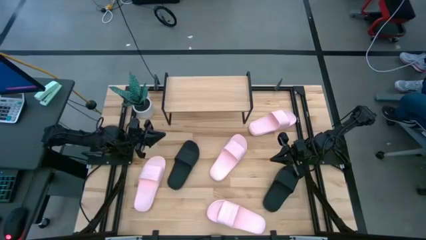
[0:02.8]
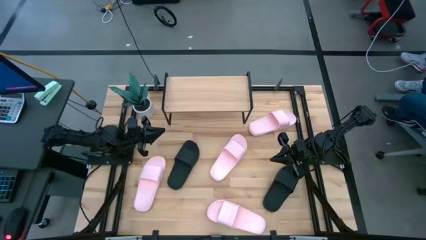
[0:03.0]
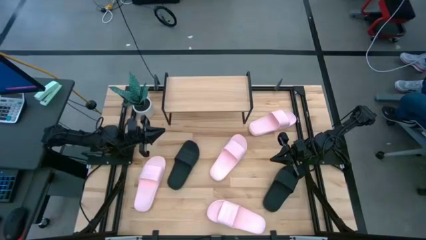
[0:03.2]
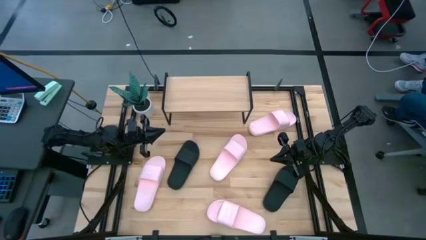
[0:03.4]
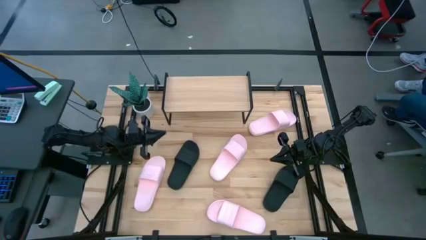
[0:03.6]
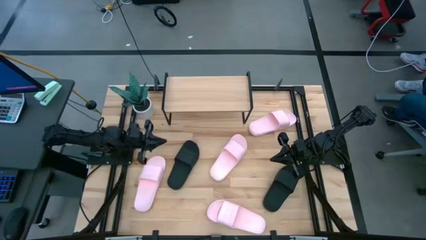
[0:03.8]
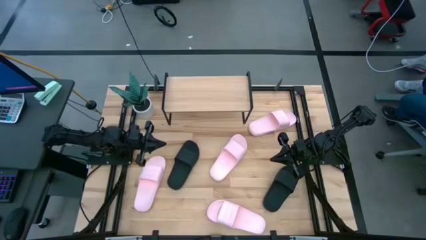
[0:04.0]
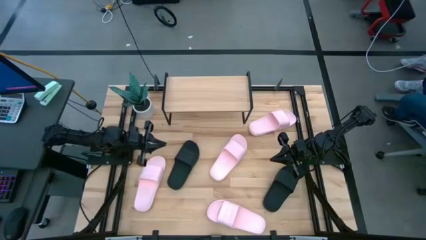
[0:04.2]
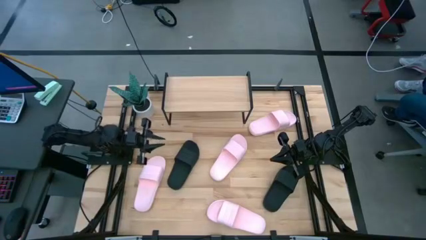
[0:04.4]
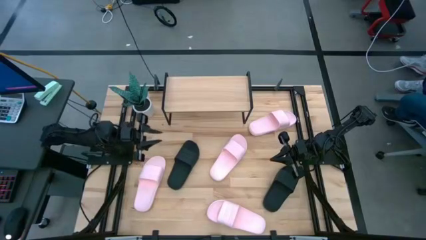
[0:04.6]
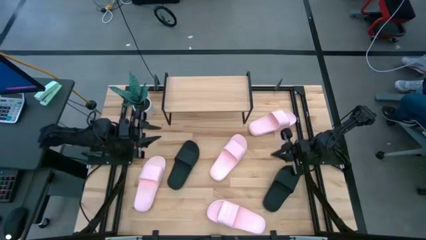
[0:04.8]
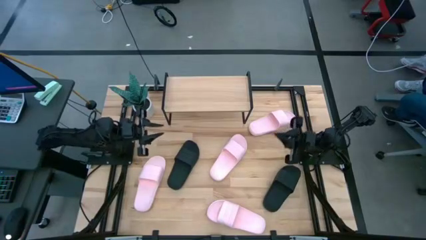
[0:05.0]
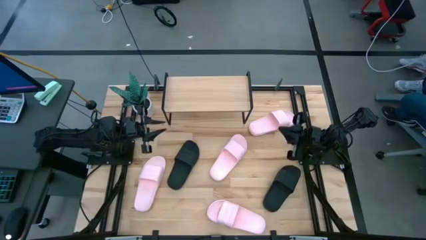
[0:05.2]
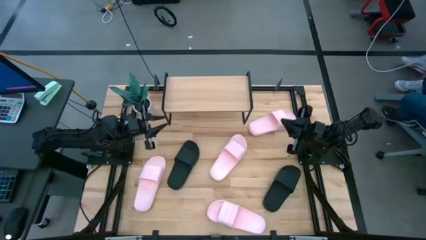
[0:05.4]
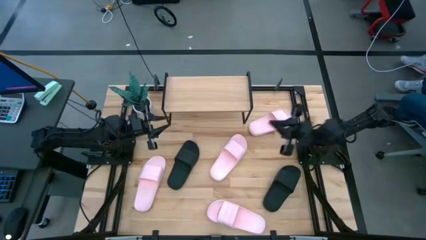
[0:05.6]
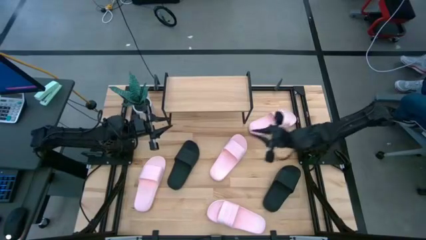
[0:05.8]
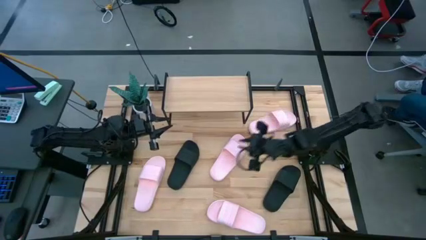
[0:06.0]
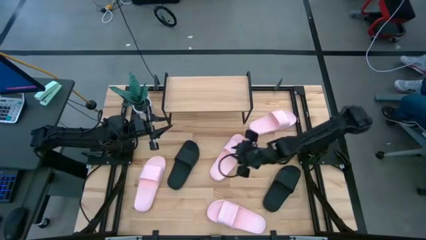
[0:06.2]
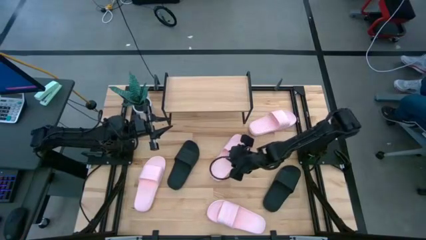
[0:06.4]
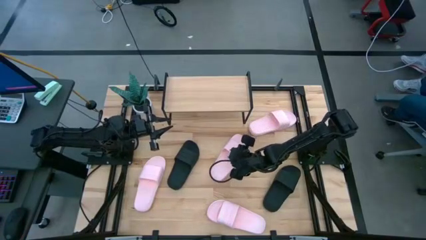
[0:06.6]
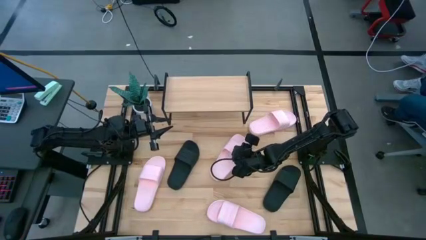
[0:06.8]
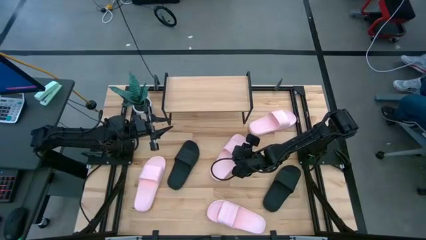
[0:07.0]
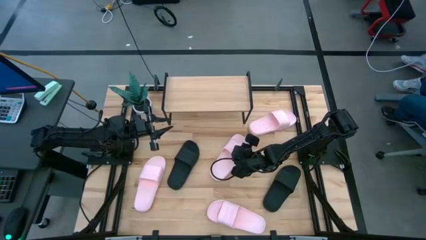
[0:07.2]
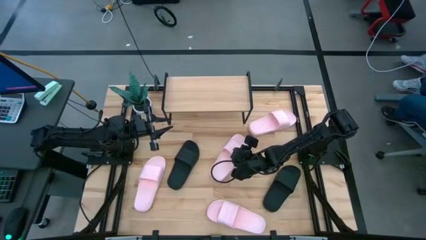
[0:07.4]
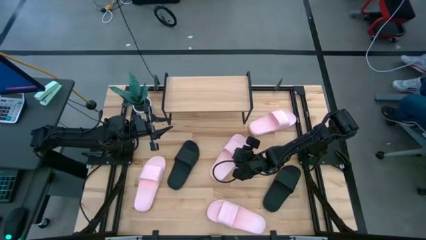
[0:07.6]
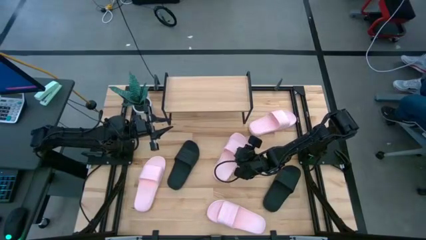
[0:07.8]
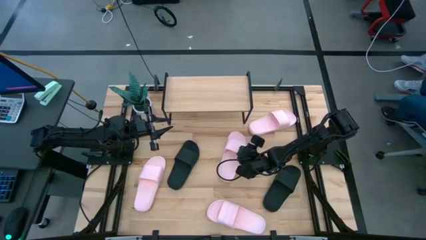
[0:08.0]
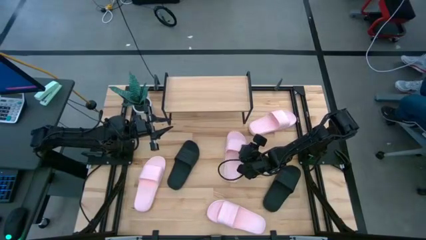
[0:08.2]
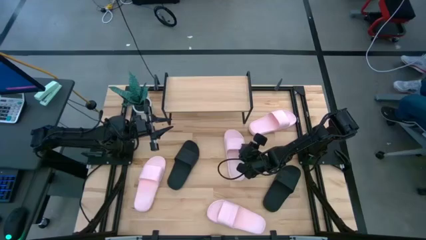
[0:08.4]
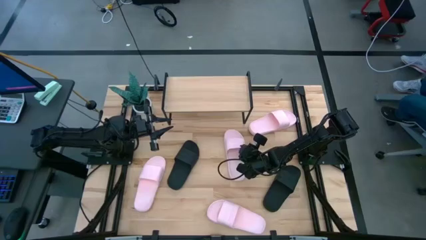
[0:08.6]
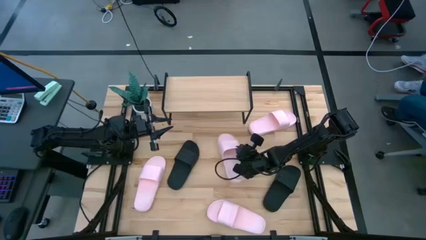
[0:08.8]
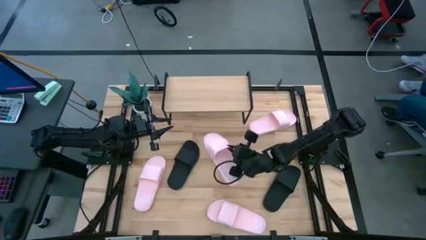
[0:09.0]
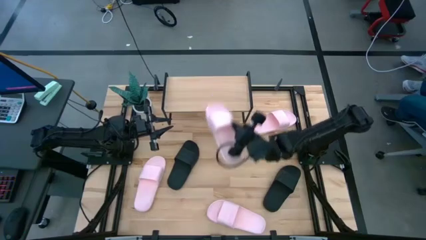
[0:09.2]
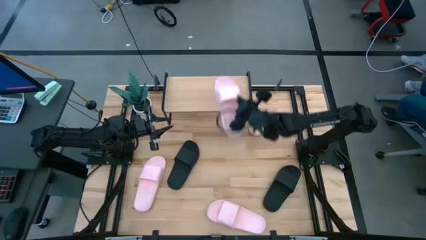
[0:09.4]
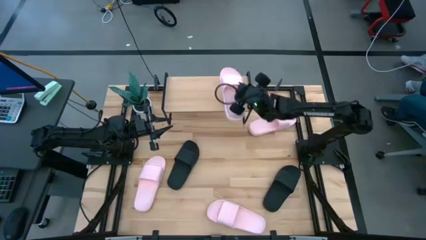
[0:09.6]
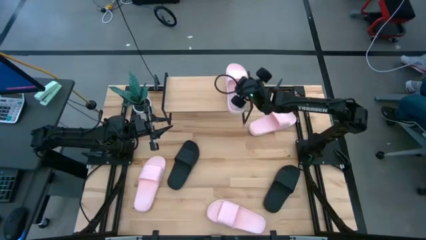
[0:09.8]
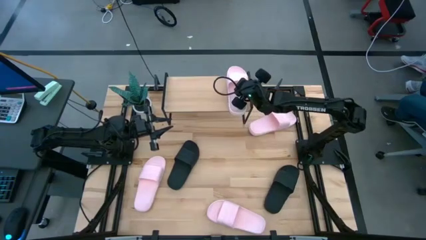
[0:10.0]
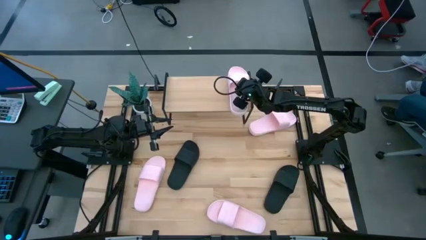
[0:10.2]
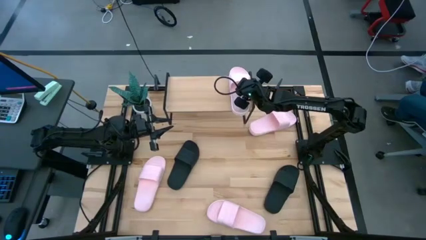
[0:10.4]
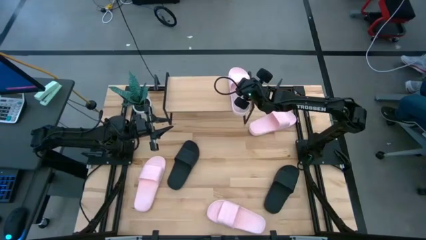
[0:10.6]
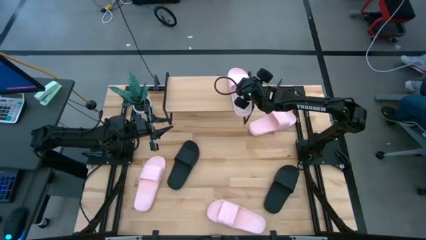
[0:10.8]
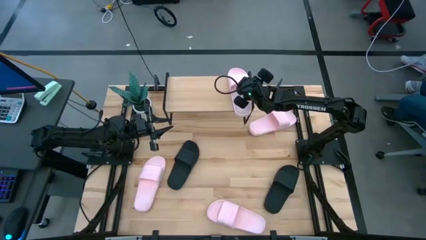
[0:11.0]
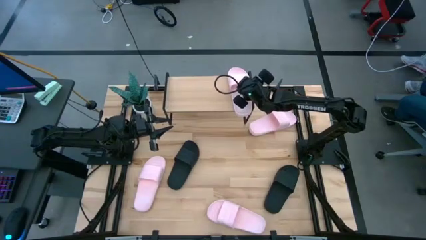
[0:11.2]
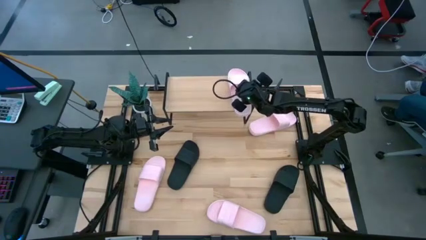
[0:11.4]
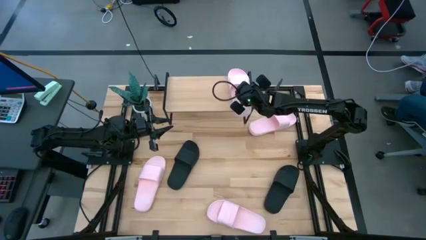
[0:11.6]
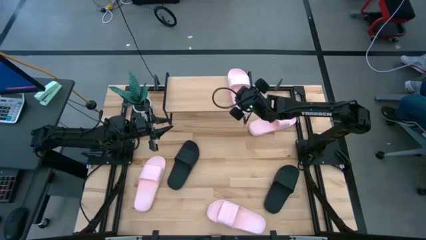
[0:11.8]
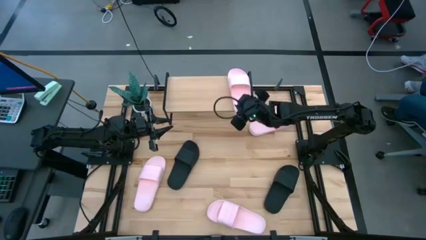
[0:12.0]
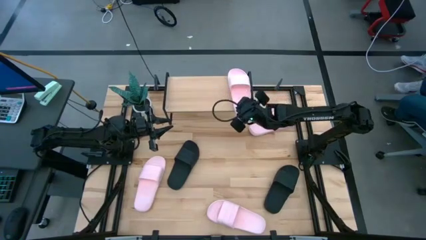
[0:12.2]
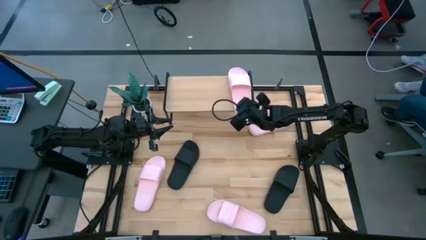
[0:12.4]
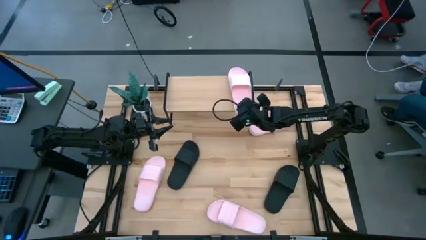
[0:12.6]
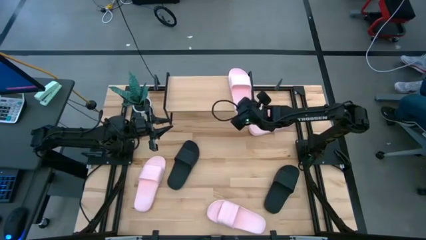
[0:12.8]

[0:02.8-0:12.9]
Task: Pick and place slides into the shelf
Put the middle right pink slides on the shelf

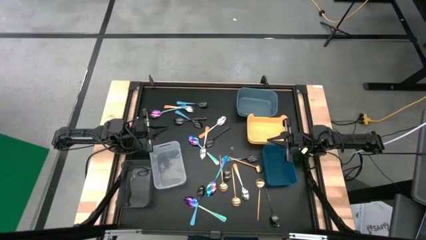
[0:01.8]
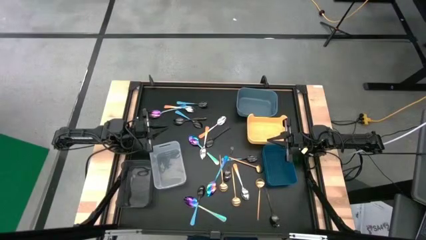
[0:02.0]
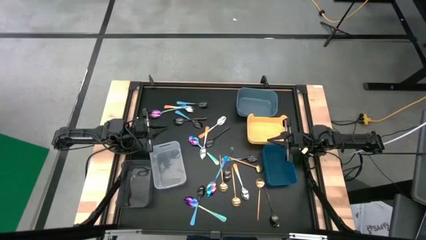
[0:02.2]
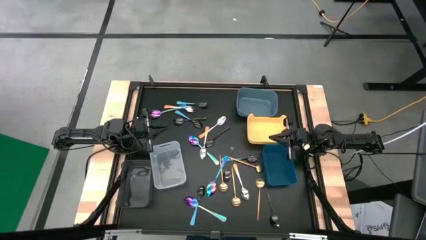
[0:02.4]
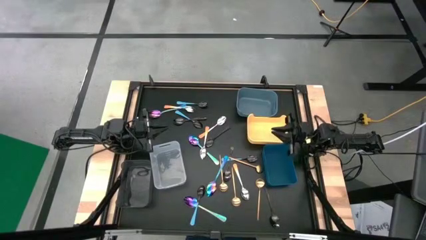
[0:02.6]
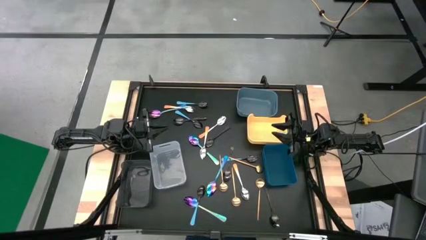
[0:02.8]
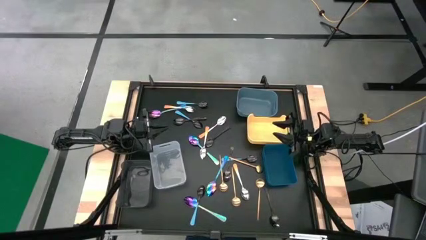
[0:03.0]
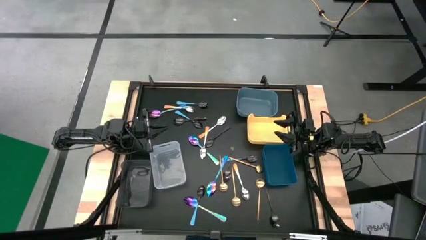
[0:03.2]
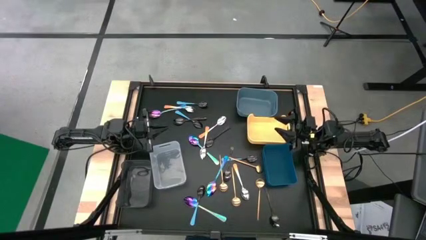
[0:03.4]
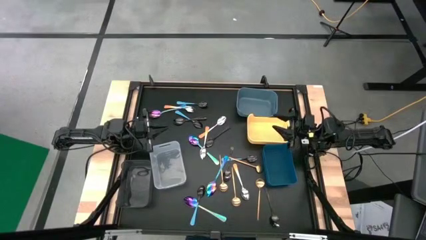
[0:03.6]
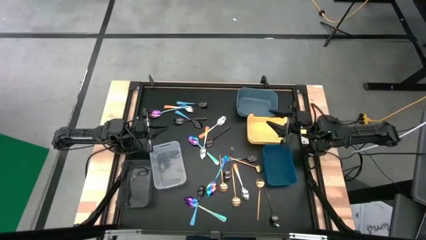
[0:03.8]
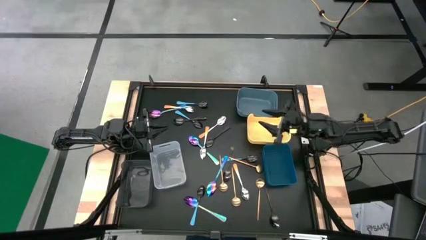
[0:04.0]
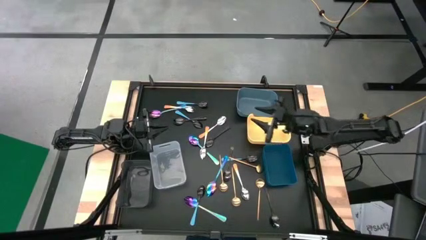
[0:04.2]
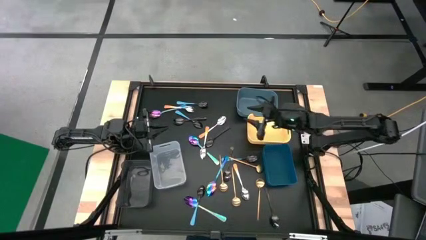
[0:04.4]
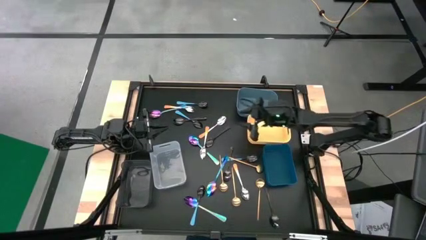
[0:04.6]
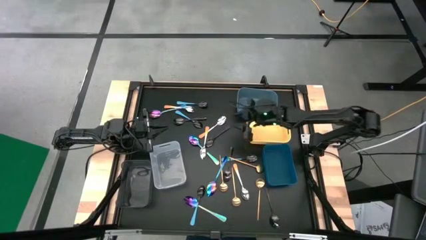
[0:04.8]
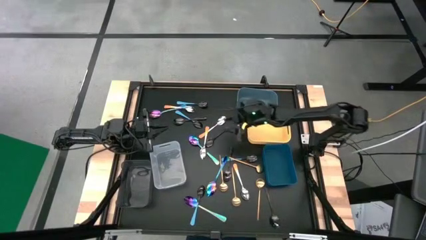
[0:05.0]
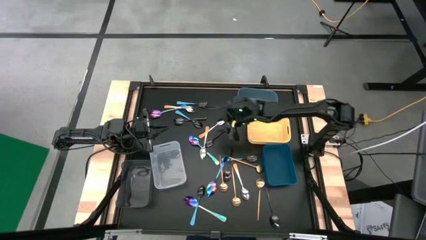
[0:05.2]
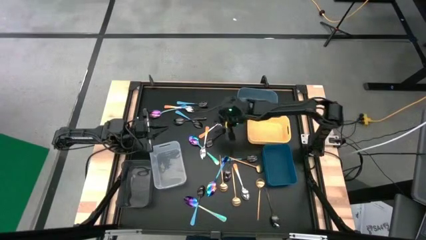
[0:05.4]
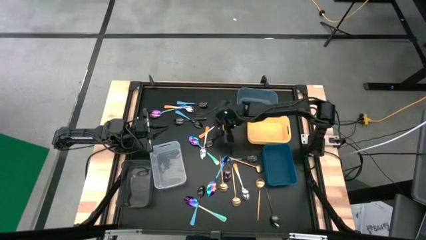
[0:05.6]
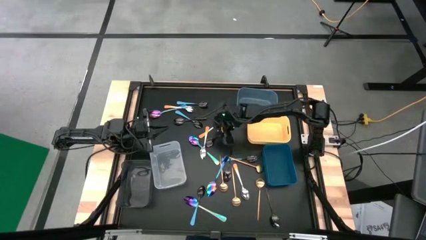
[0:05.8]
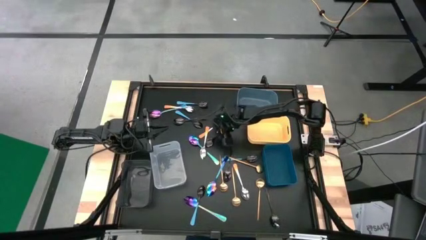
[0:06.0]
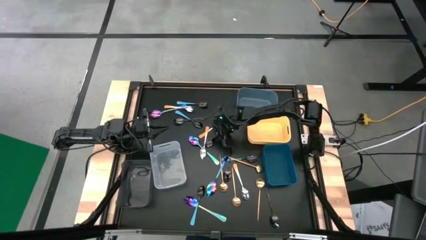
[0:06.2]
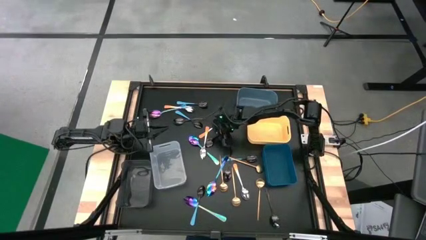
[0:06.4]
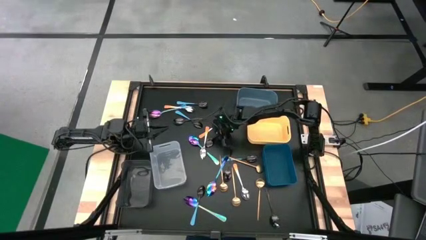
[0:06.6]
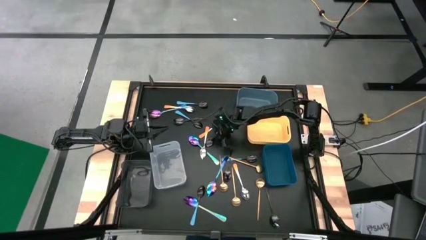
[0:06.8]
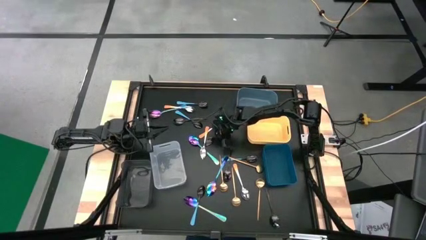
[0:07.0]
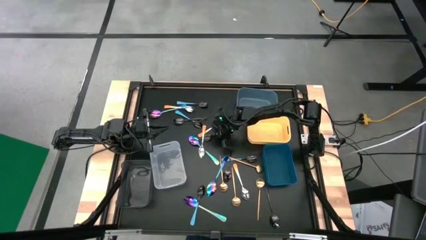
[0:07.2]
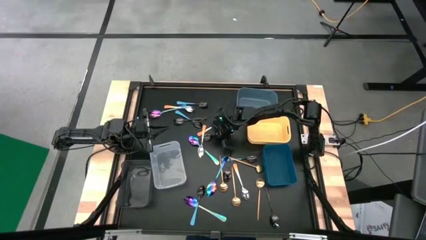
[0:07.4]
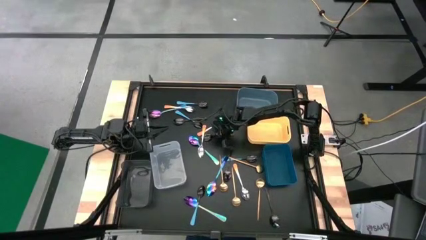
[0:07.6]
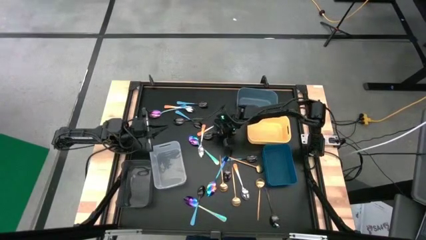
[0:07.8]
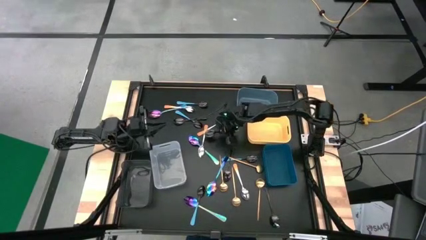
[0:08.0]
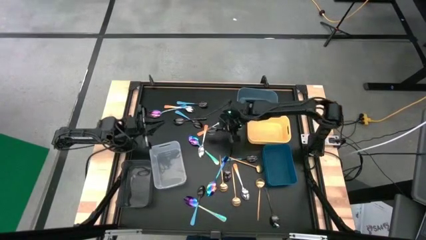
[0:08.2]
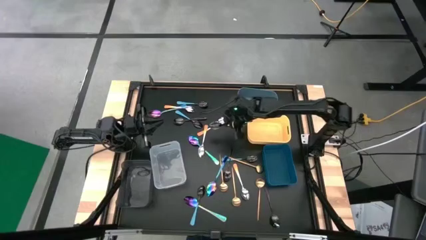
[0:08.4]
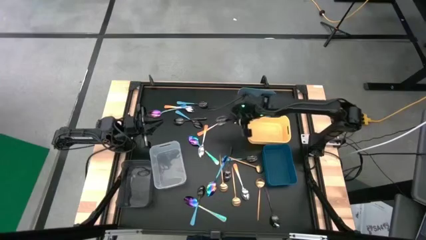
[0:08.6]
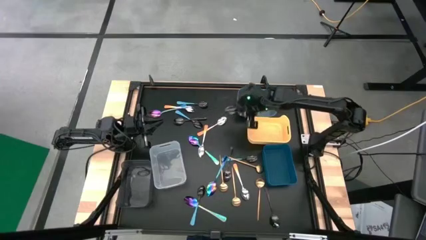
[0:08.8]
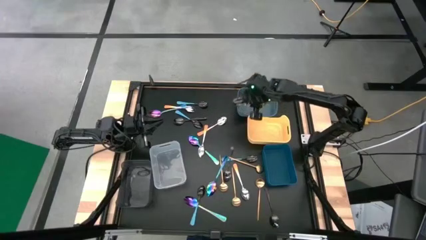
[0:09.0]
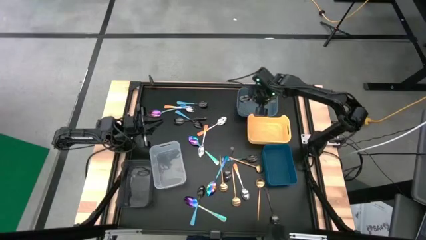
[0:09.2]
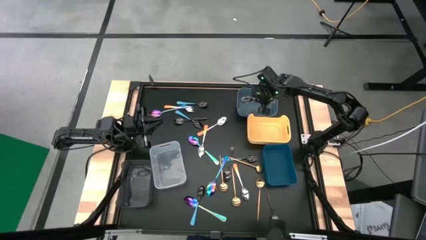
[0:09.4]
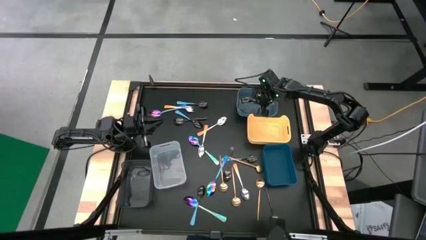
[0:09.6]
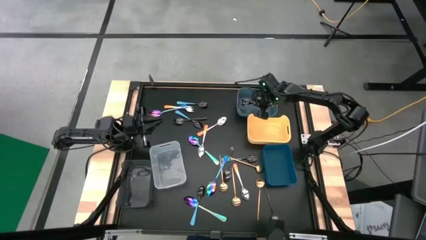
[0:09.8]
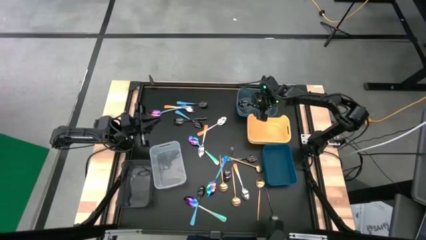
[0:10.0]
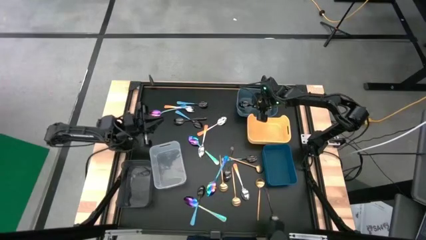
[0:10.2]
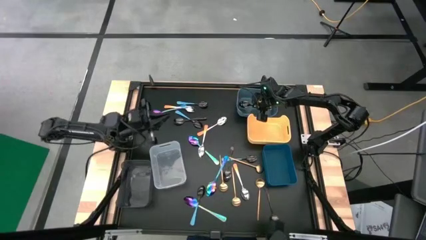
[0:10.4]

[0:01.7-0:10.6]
Task: Sort silverware by color (type)
Put the black spoon into the light blue bin
